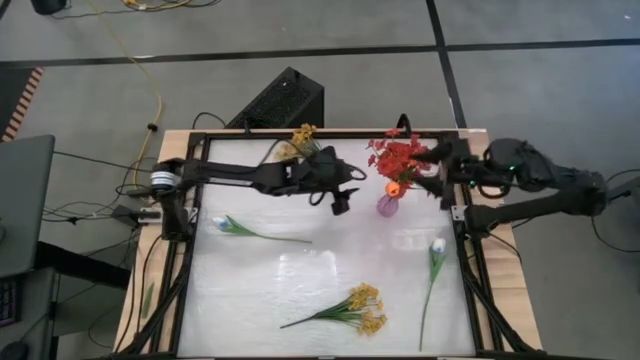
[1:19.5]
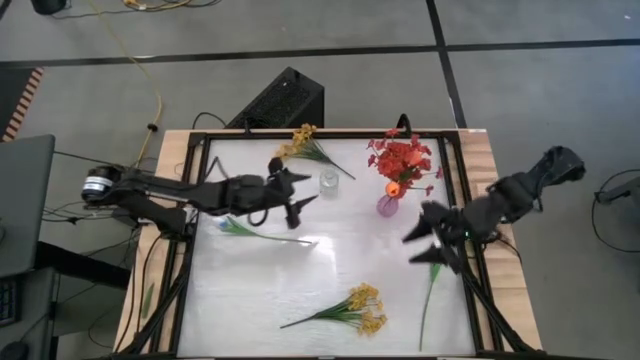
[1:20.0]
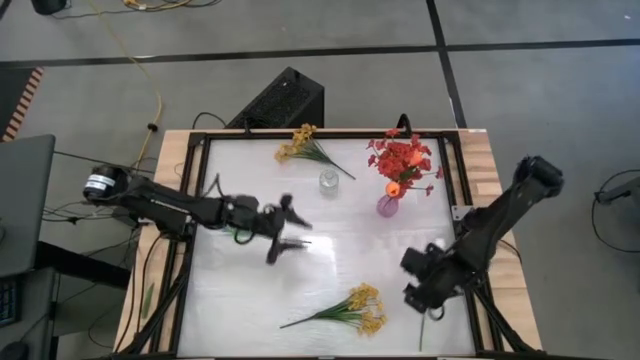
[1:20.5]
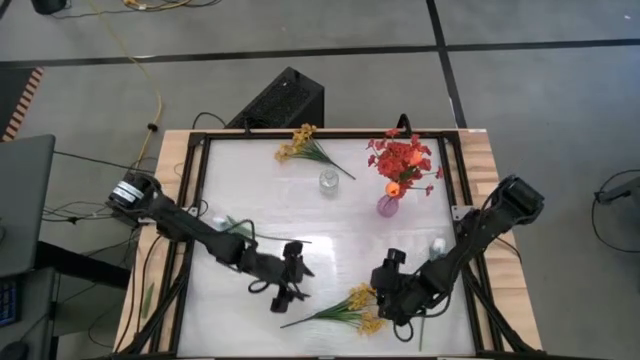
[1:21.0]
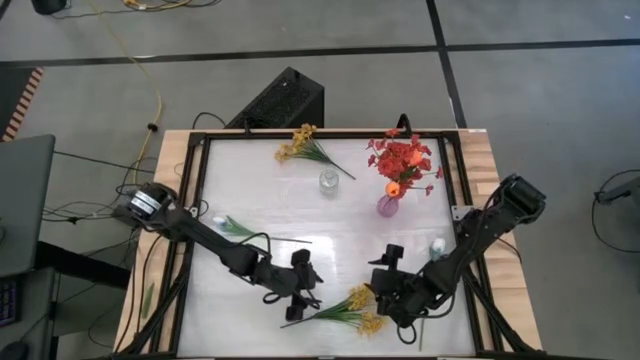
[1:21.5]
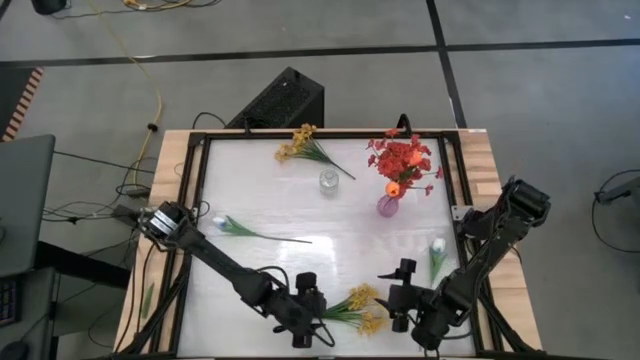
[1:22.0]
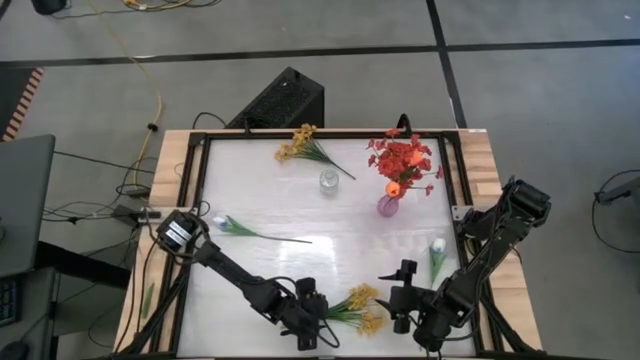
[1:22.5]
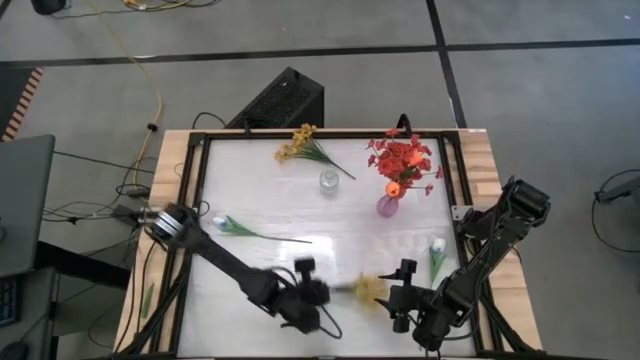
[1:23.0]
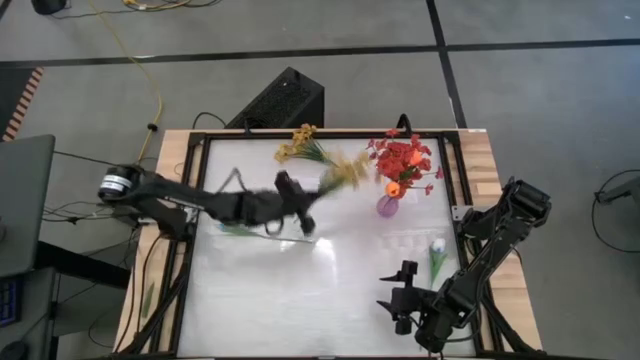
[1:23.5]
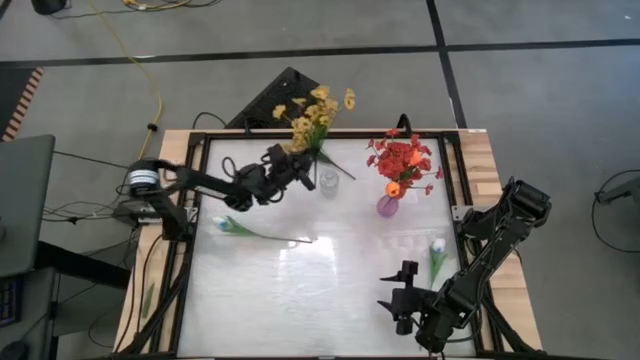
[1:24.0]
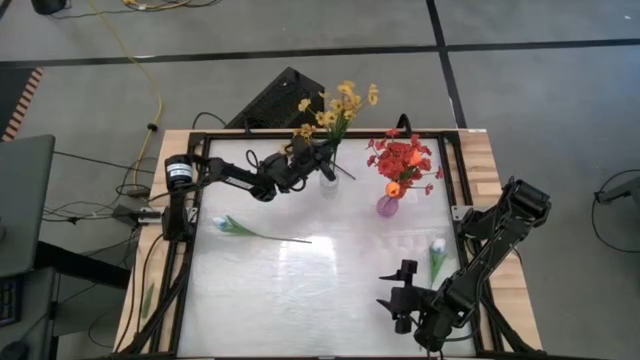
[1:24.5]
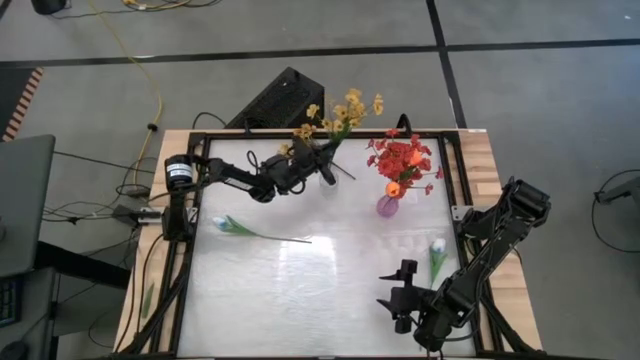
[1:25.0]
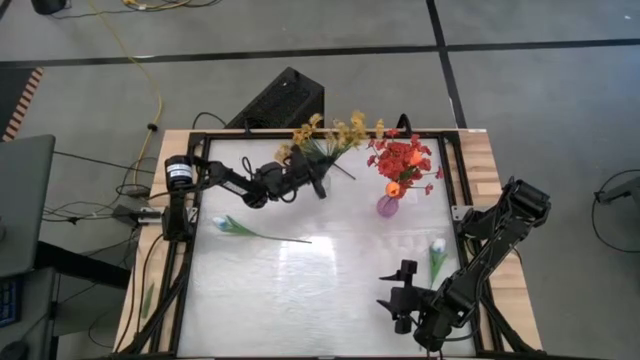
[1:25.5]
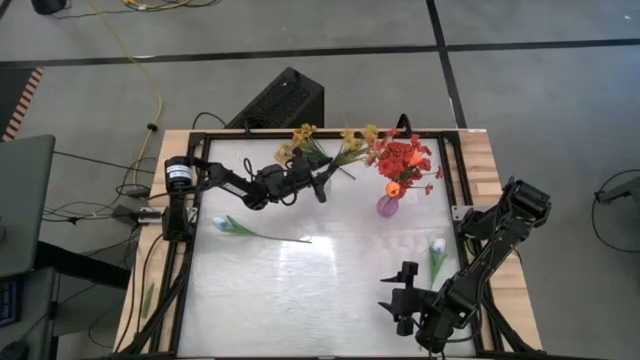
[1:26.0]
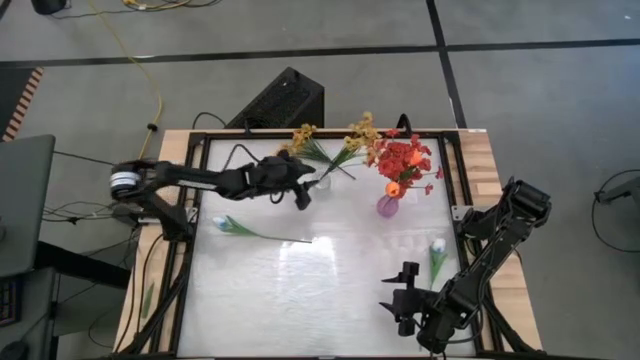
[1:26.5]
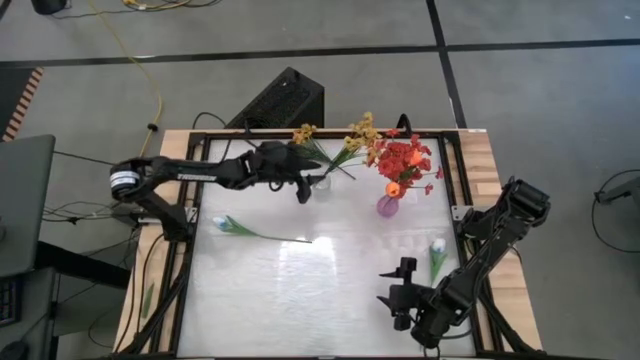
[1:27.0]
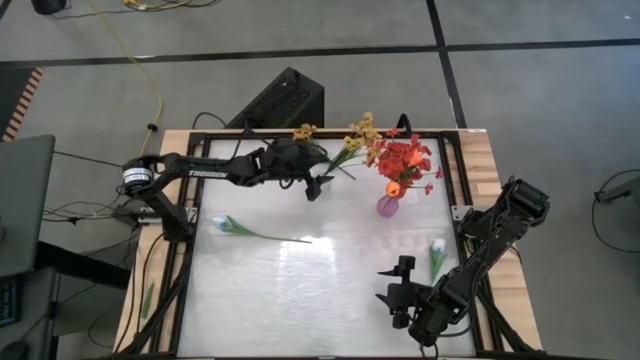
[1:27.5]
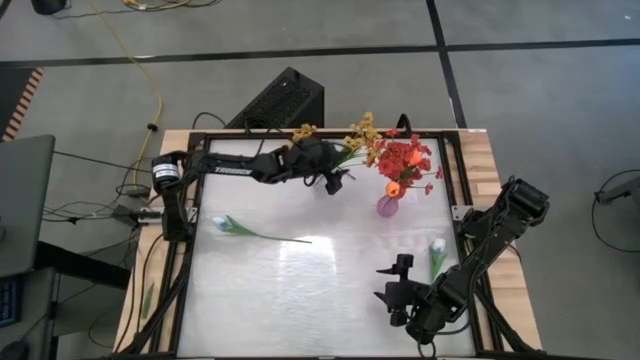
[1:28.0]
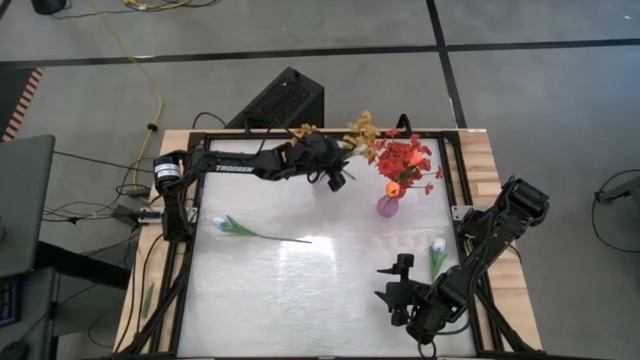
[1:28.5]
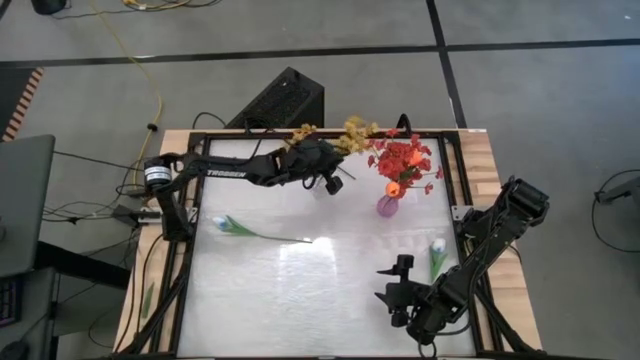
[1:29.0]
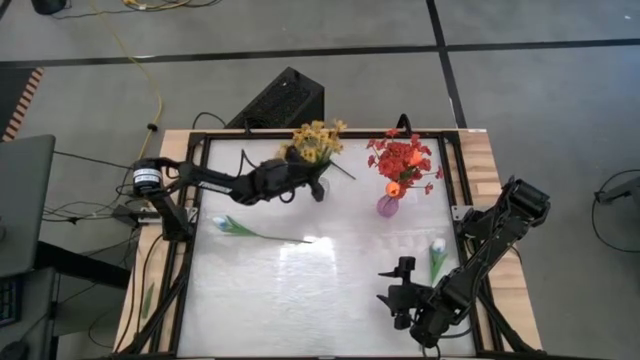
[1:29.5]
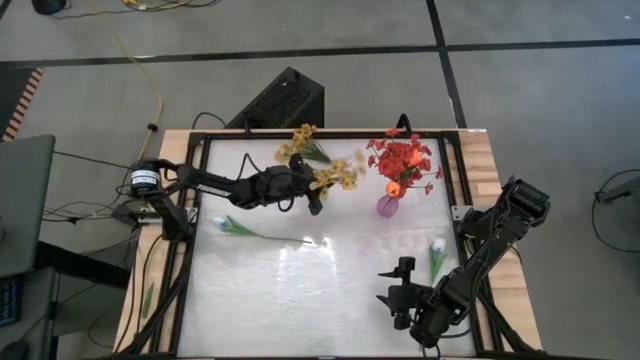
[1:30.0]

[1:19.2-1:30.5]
Task: Sort flowers into vase by color
Put the bottom yellow flower into the transparent flower vase

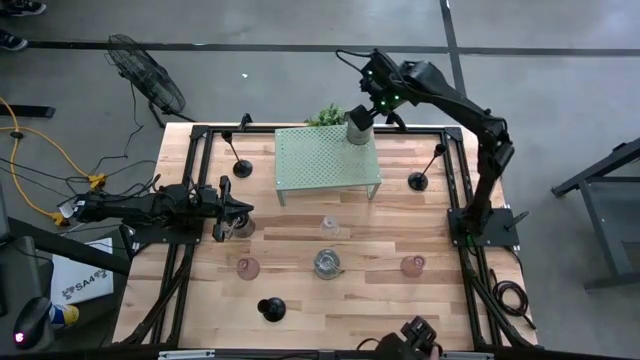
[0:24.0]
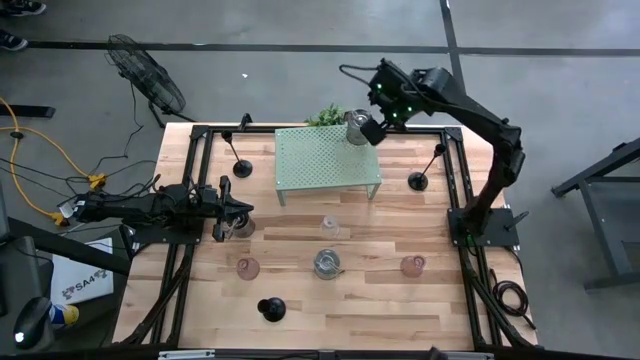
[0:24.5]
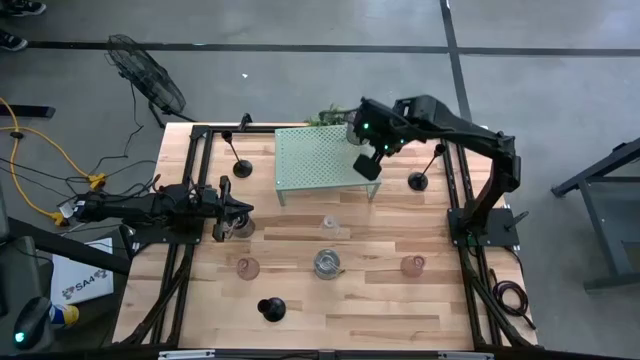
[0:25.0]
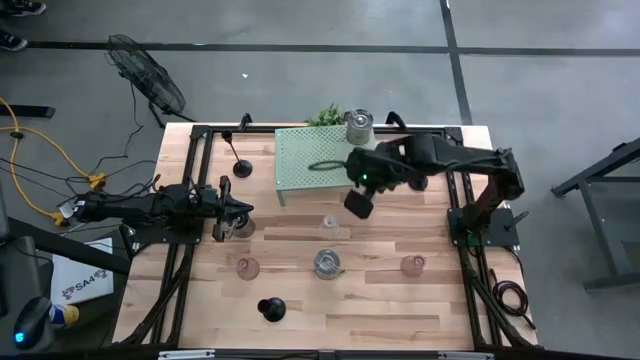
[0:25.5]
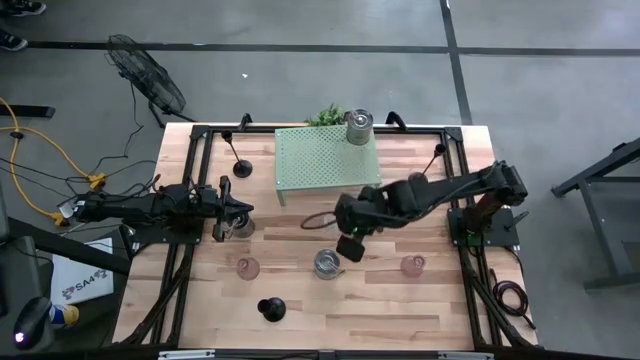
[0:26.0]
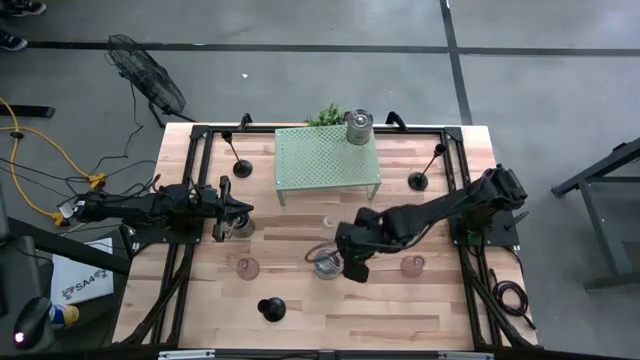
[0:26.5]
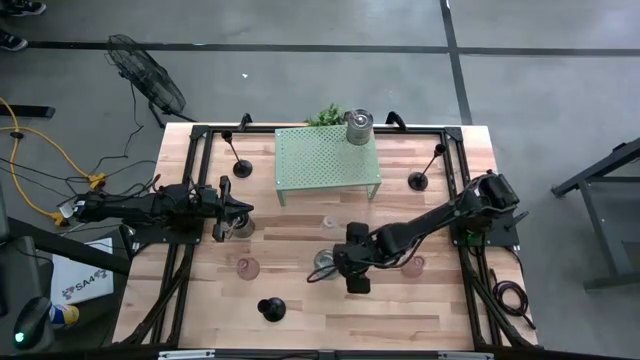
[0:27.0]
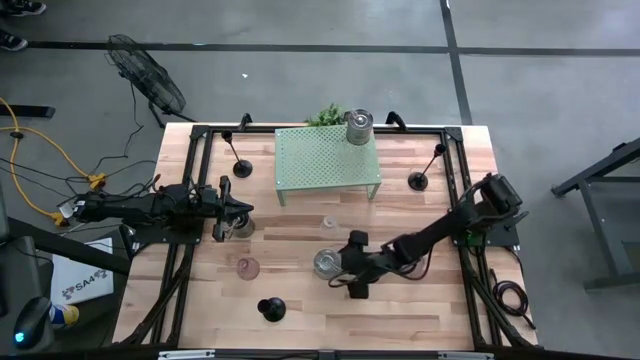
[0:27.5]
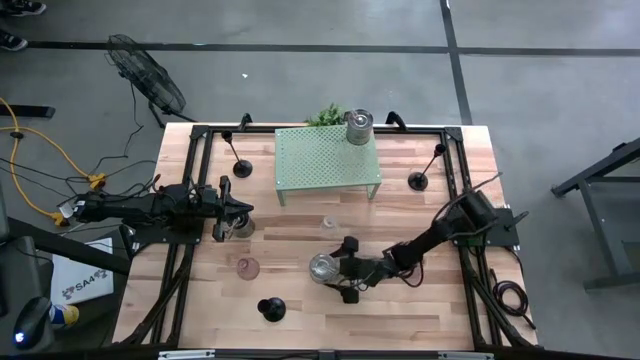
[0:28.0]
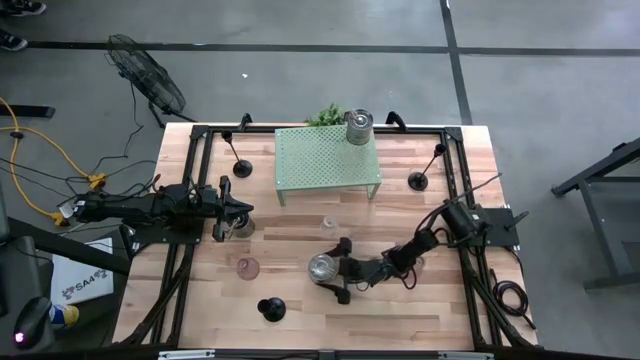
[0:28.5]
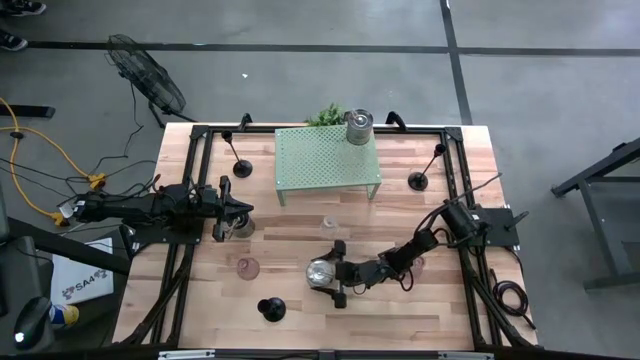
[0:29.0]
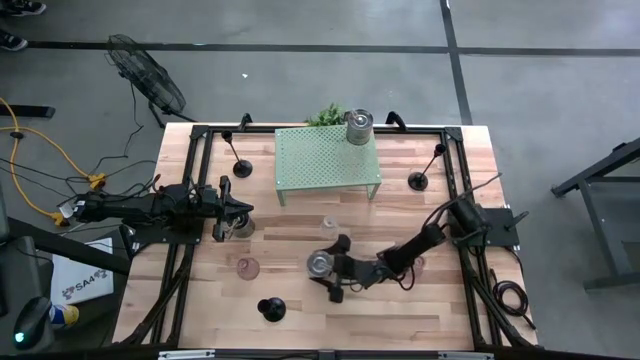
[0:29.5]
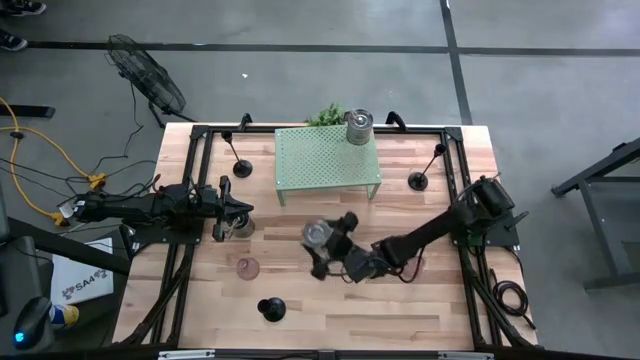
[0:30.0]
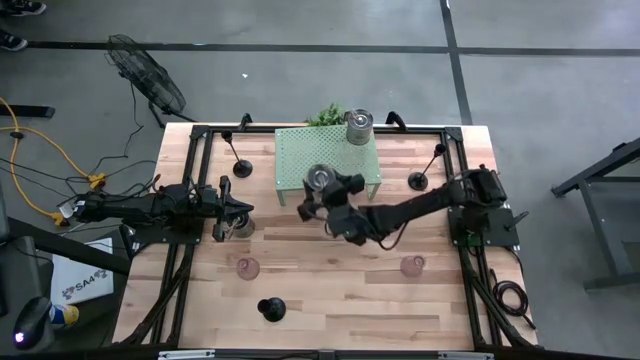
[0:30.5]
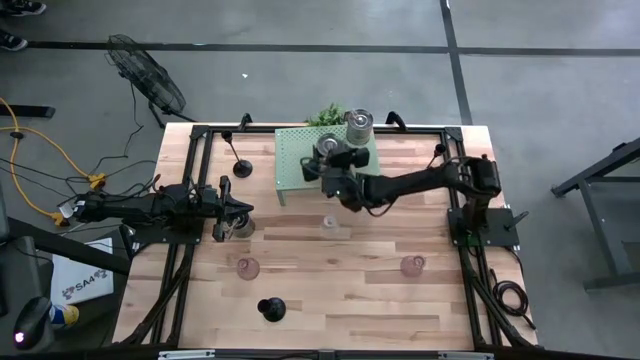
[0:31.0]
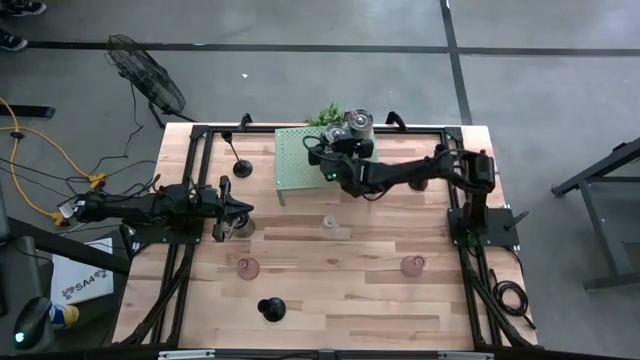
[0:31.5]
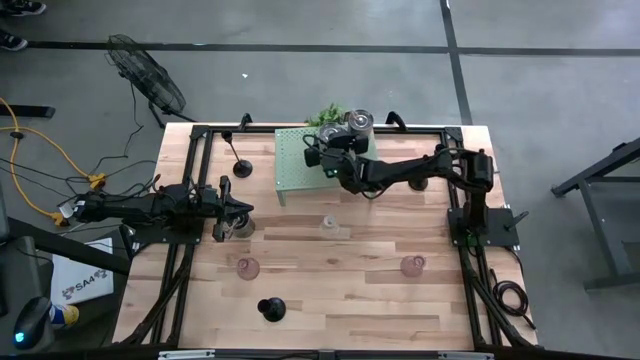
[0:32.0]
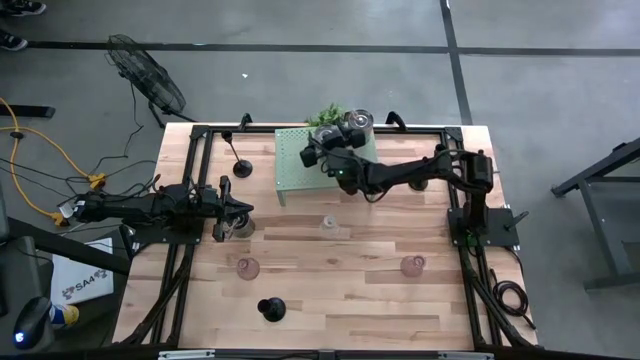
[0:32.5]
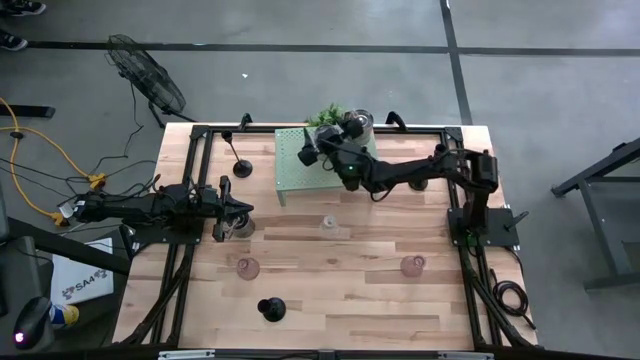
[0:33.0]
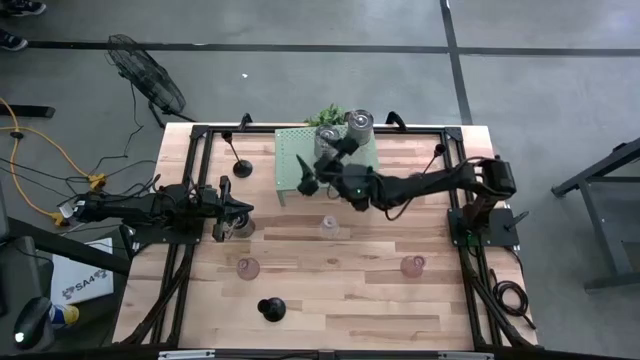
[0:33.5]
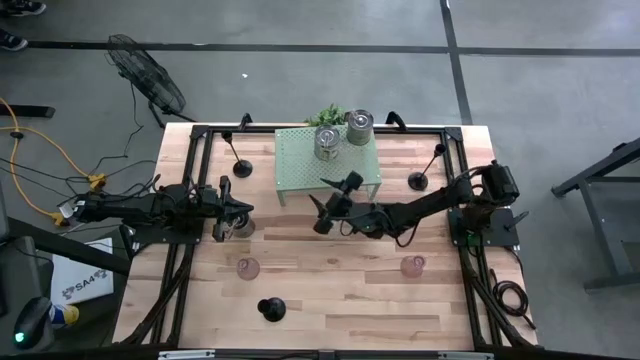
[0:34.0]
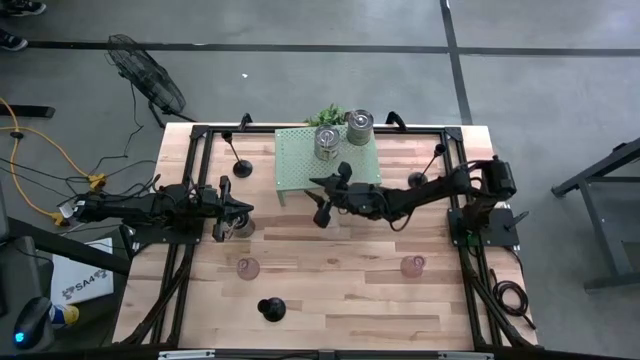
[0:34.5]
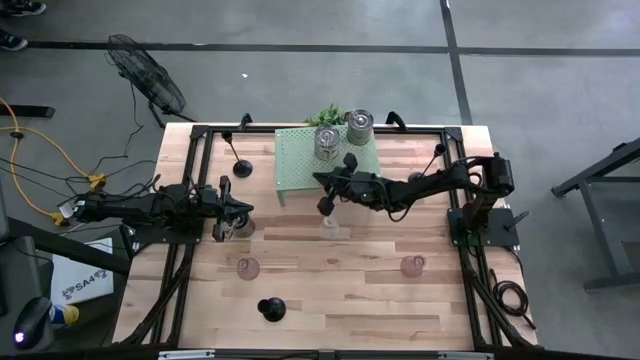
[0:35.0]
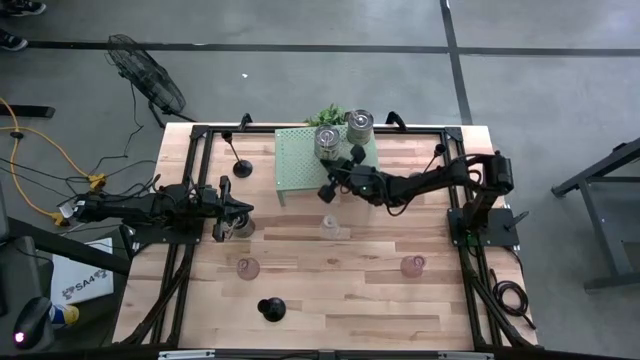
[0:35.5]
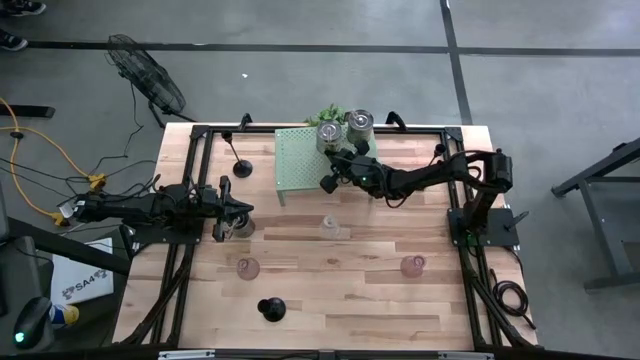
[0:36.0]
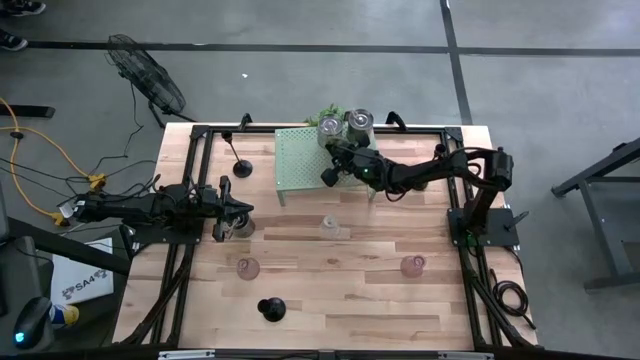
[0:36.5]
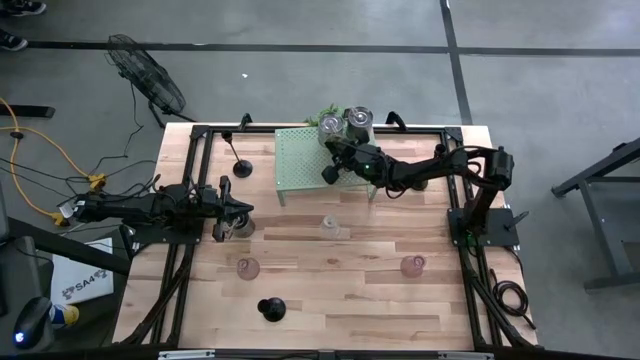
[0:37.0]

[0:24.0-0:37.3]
Task: Pick & Place candle stick holders
Put the bottom silver scented candle on the shelf aligned with the silver scented candle
